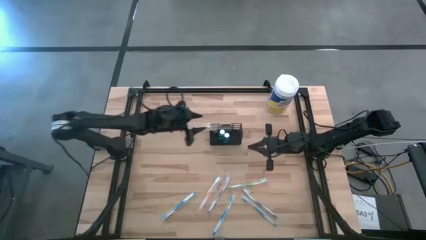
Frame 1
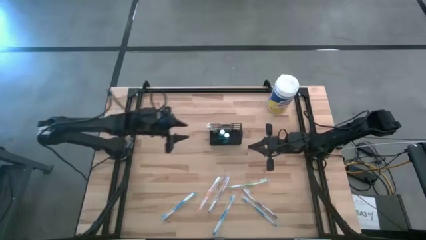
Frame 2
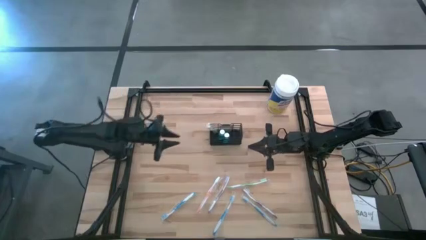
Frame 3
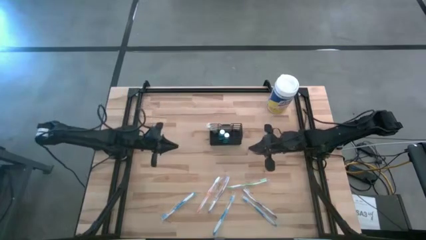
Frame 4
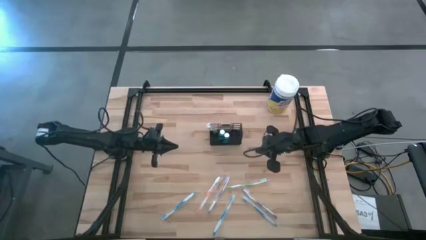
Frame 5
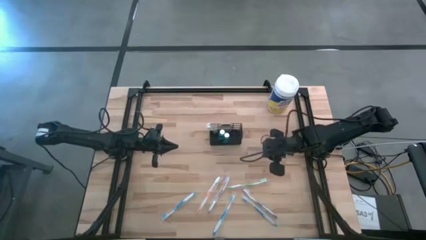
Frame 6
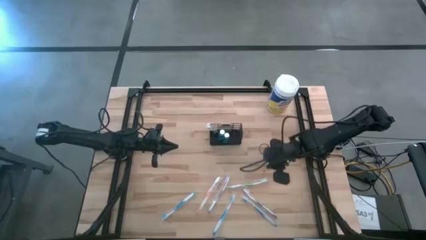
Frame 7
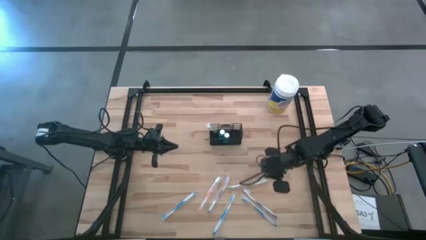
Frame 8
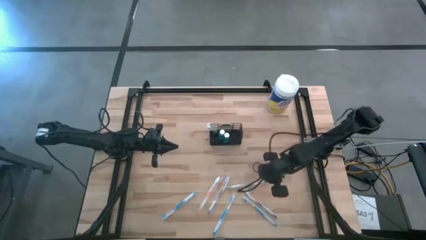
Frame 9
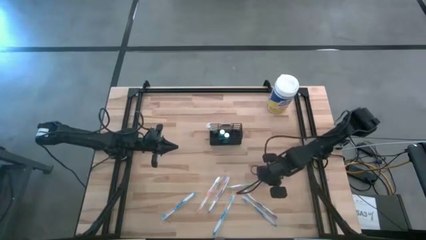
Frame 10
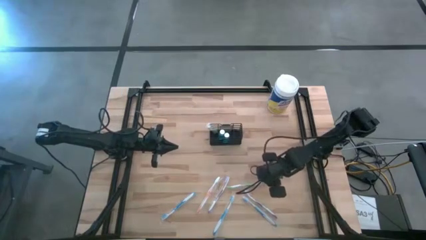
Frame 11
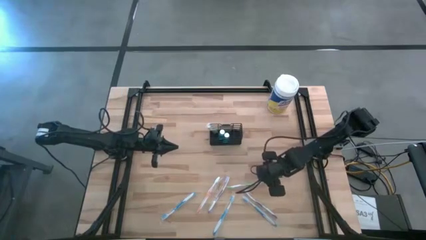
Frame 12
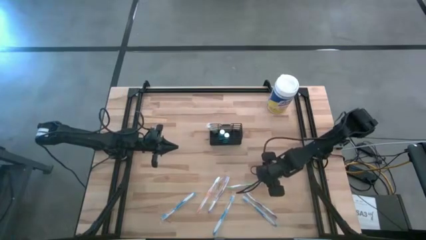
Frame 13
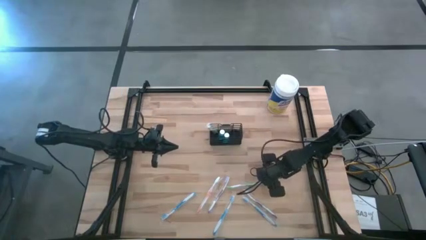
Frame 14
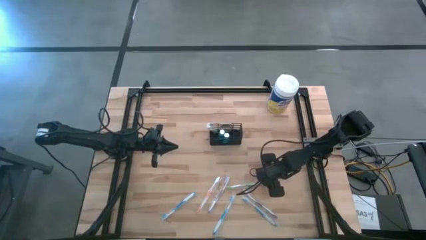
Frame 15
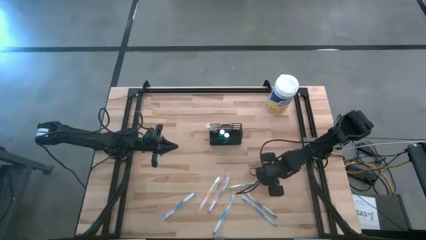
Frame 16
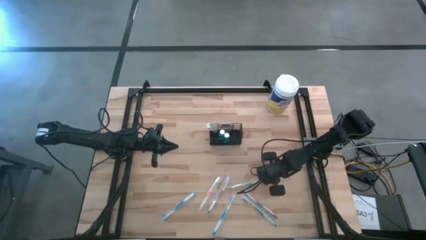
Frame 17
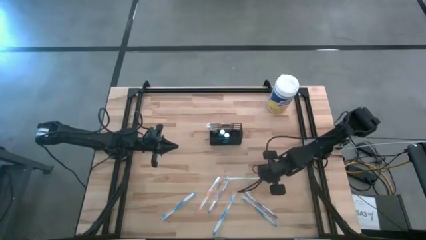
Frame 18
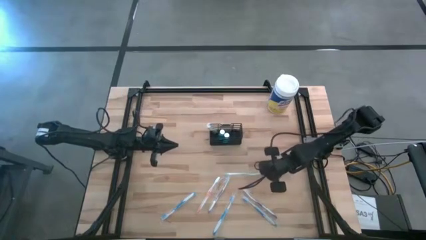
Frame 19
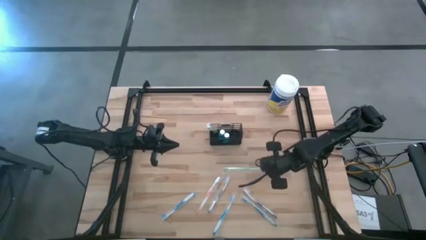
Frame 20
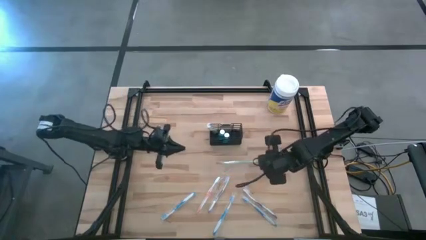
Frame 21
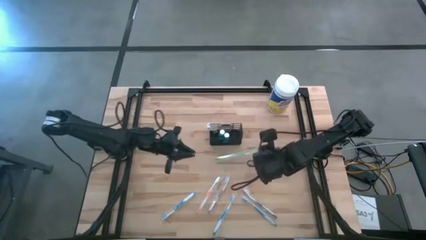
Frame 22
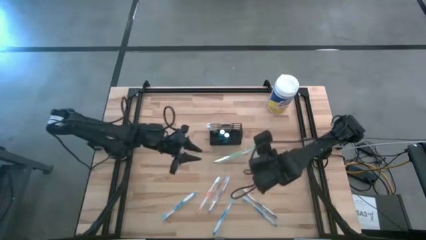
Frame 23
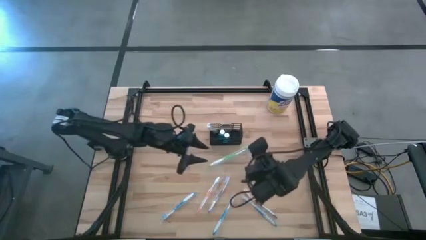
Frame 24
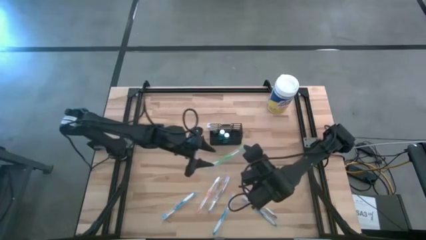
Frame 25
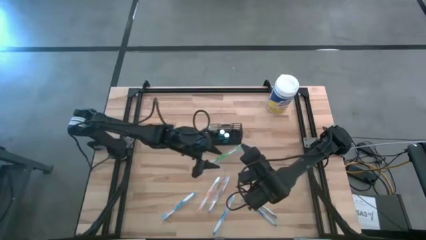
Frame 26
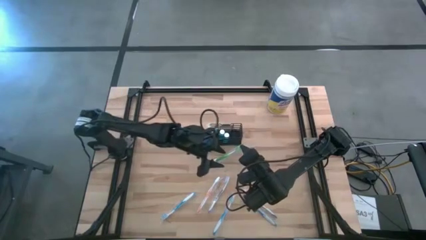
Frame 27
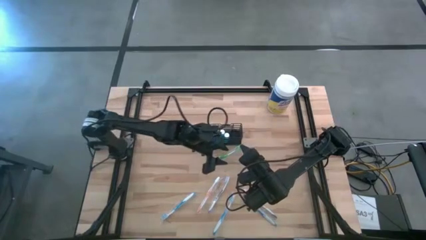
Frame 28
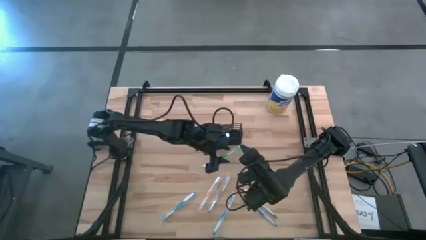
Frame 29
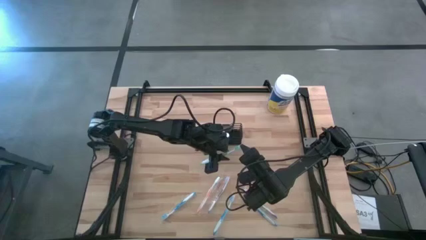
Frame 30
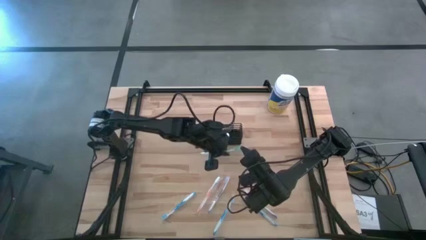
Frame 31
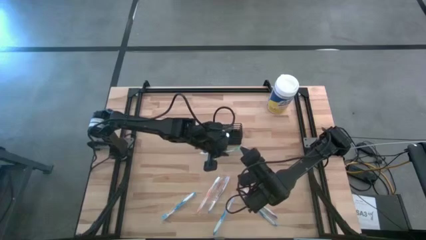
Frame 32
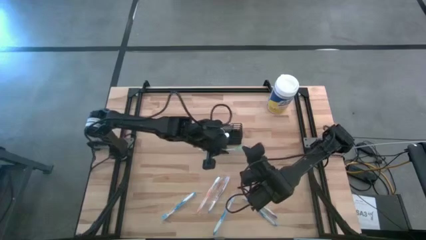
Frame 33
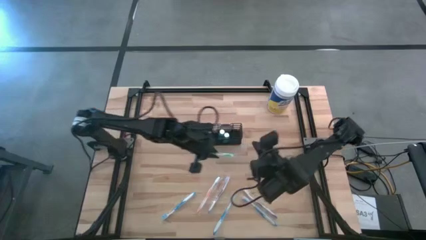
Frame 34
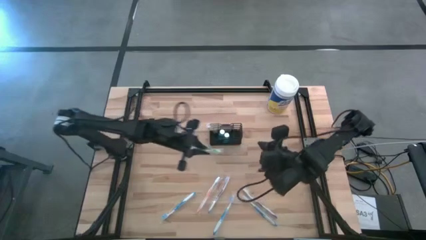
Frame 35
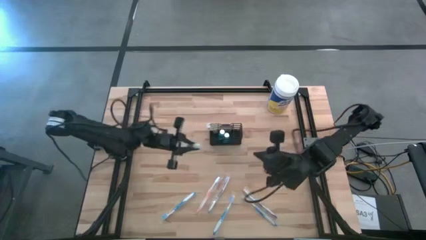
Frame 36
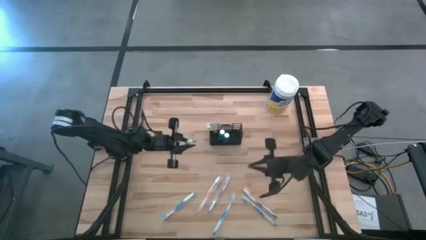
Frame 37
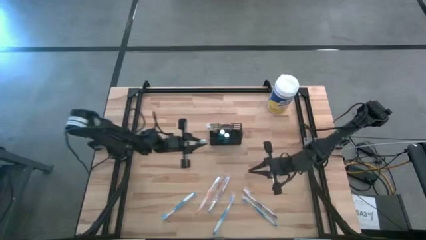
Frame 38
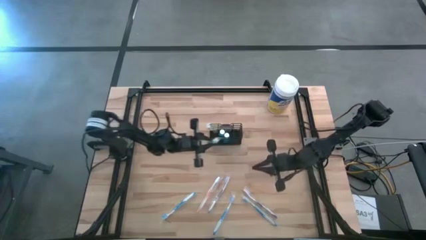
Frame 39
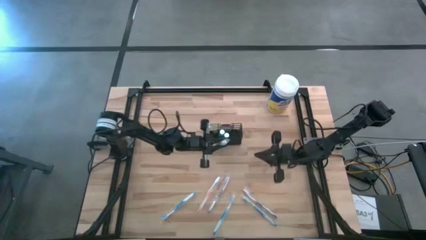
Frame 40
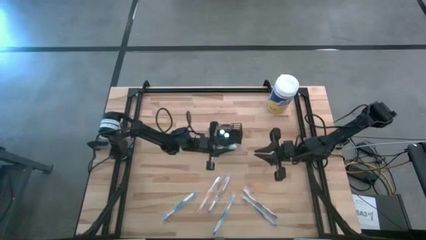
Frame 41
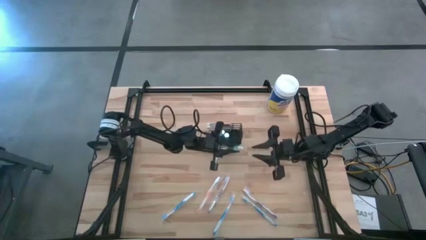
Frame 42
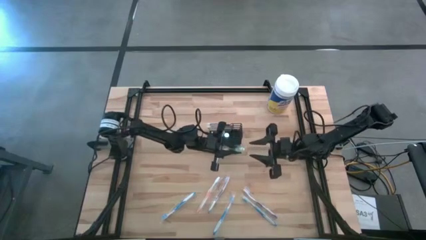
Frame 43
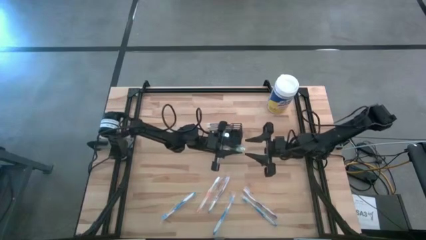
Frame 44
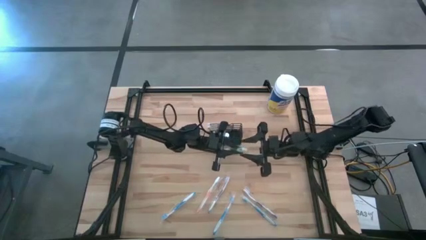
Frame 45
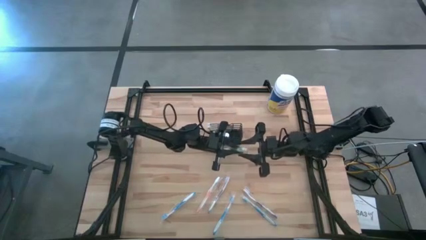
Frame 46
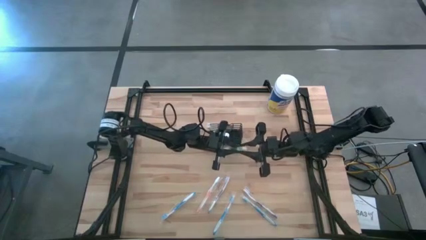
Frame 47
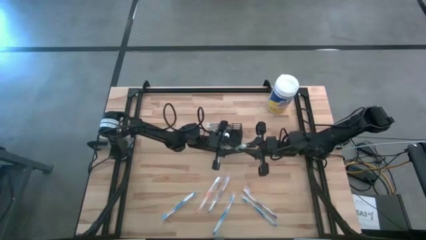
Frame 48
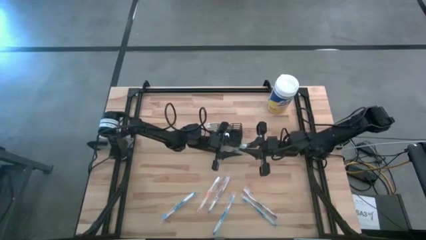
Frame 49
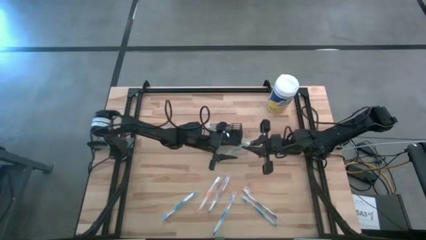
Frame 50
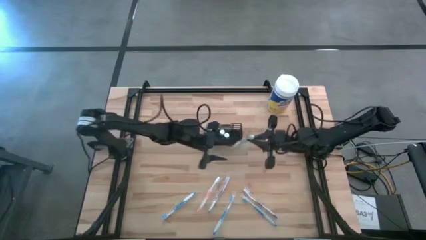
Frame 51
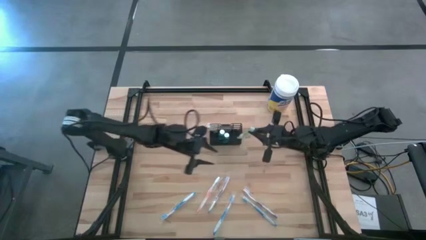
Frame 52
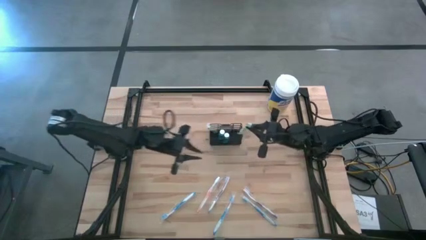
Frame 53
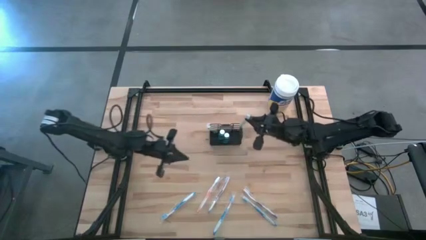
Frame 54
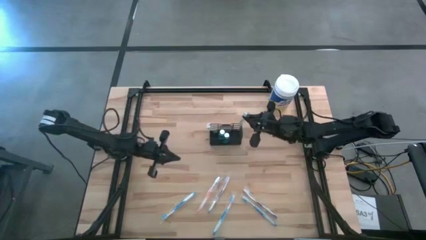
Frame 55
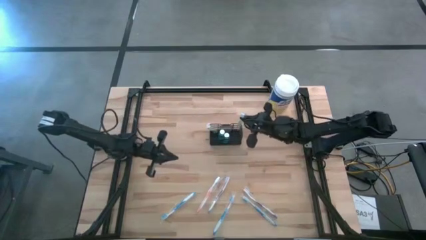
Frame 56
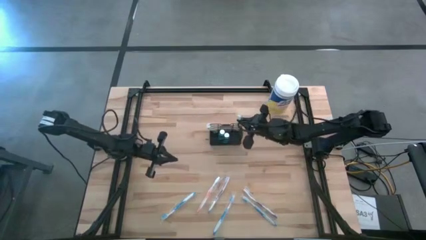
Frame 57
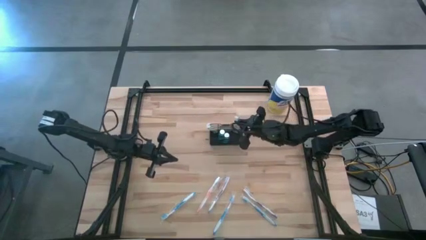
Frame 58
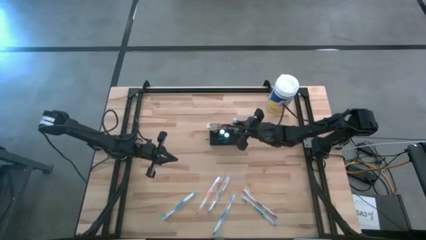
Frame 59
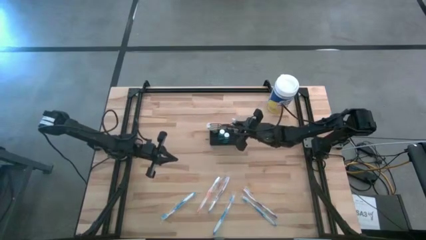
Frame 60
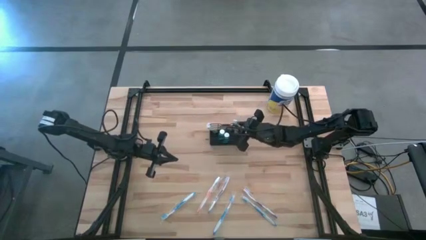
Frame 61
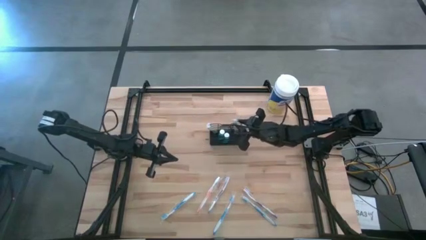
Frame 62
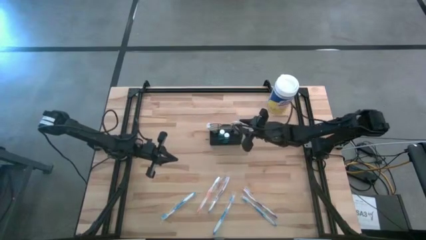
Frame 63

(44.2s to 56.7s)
Task: Pick & Place toothbrushing station
Put the green toothbrush into the black wire organizer
